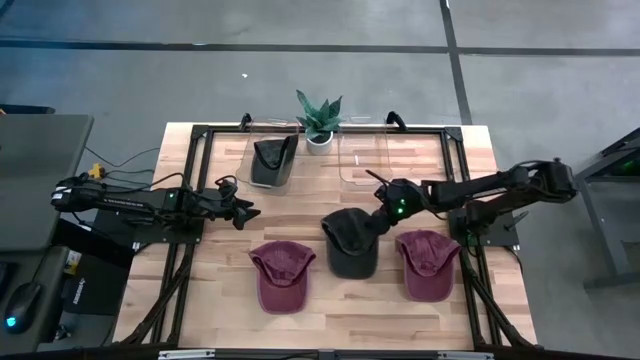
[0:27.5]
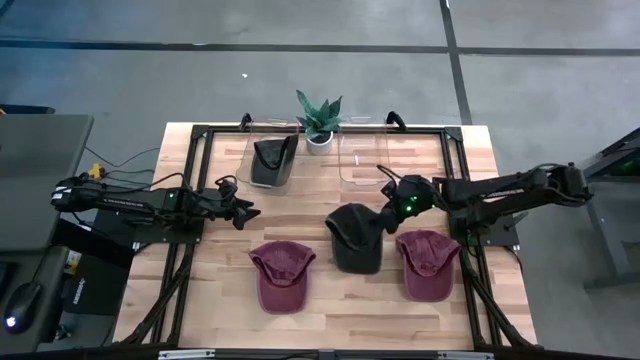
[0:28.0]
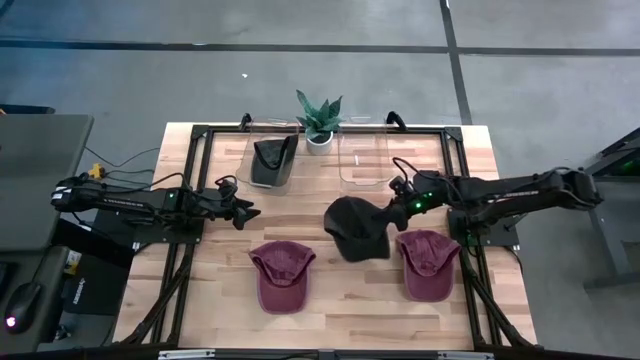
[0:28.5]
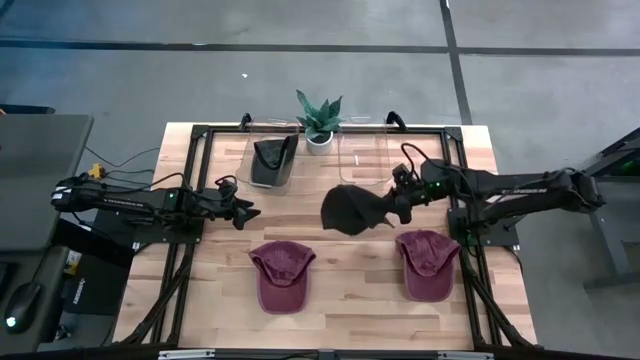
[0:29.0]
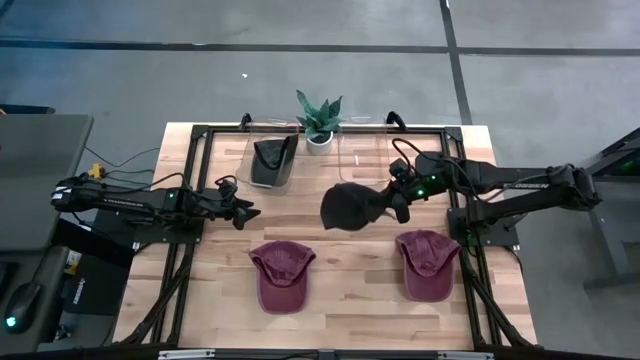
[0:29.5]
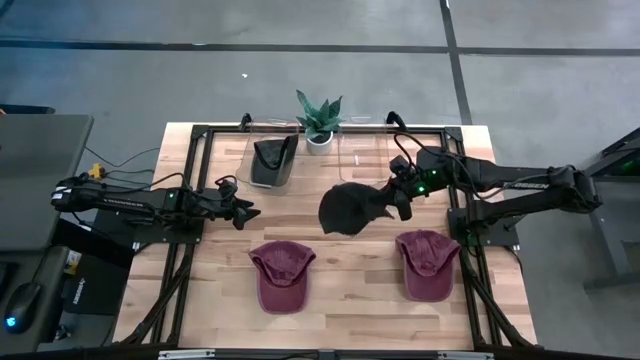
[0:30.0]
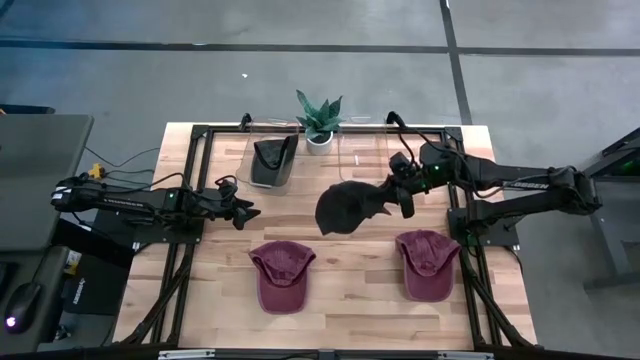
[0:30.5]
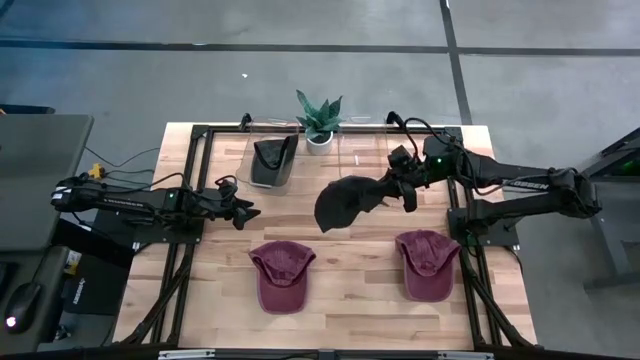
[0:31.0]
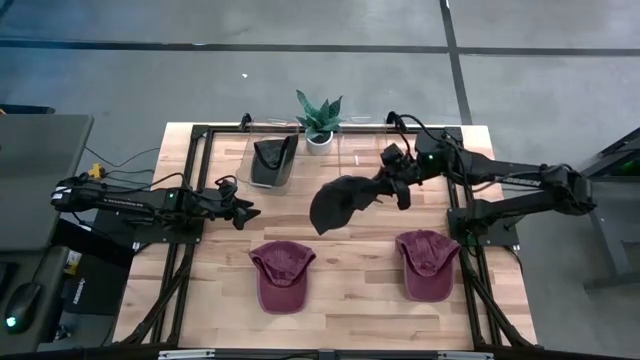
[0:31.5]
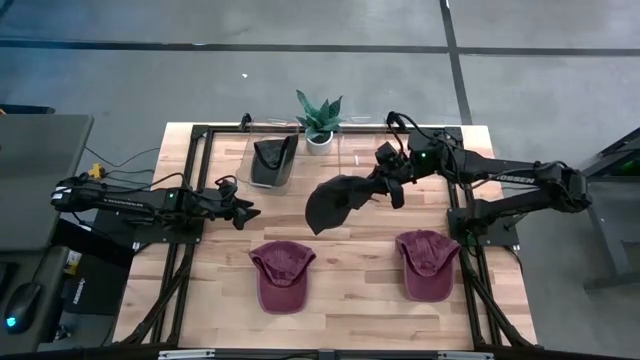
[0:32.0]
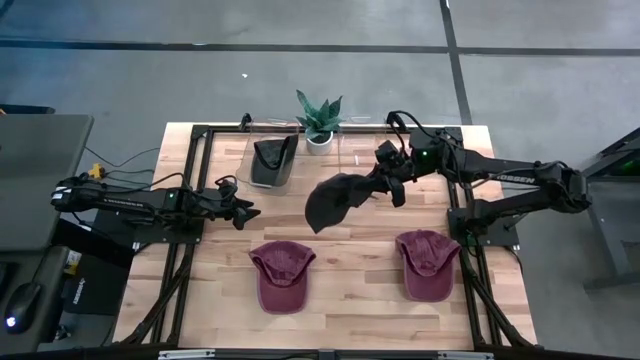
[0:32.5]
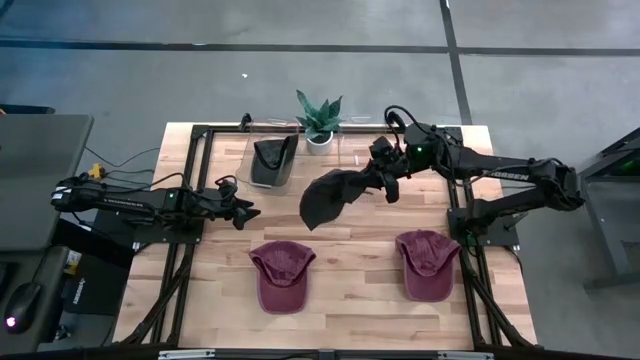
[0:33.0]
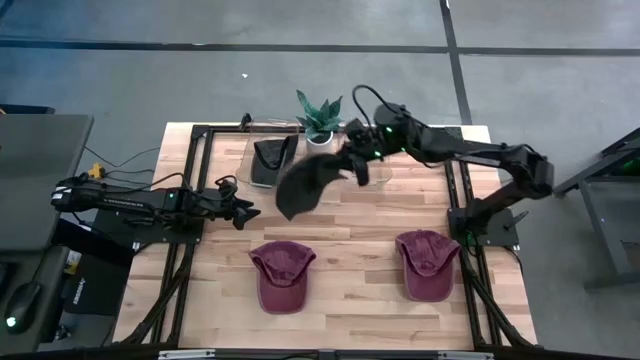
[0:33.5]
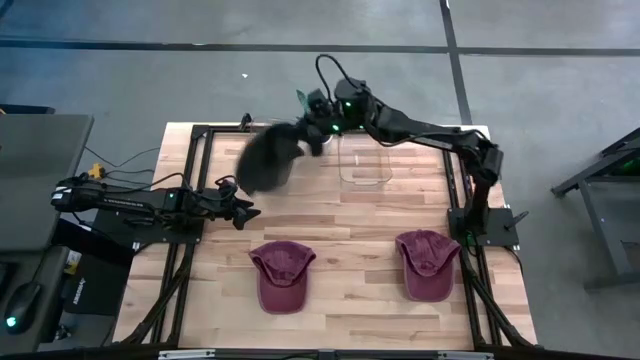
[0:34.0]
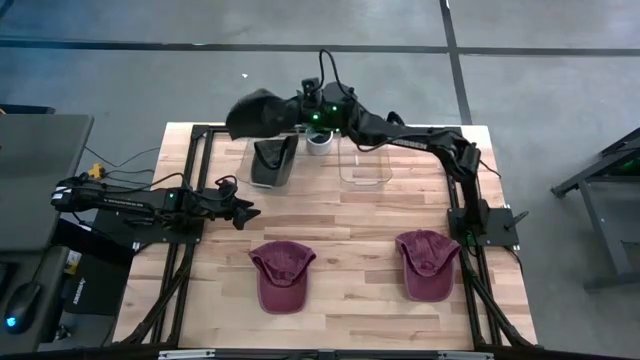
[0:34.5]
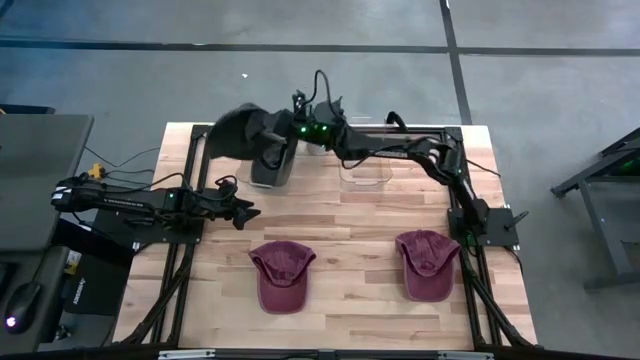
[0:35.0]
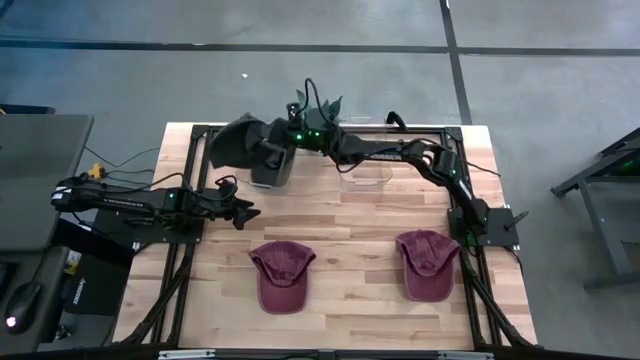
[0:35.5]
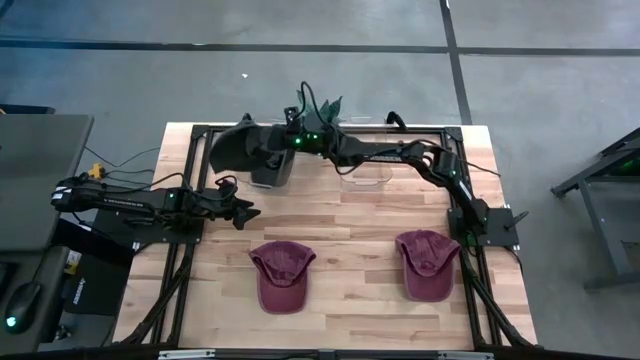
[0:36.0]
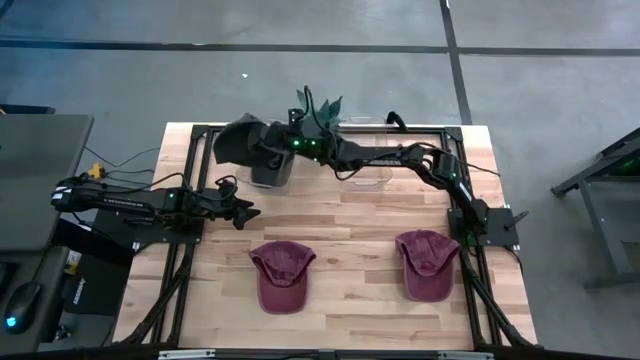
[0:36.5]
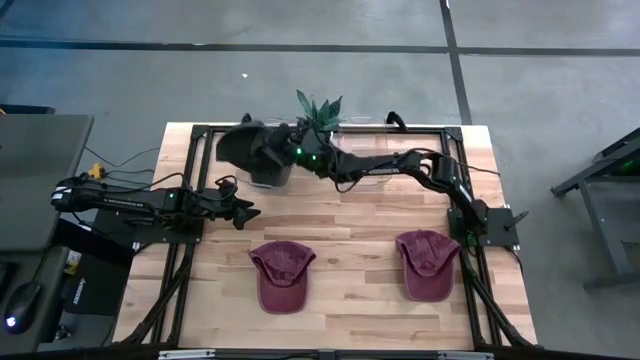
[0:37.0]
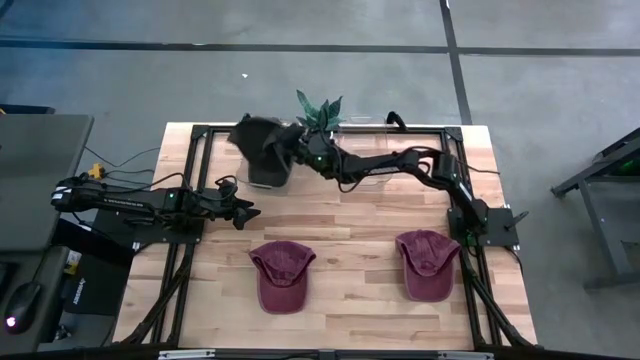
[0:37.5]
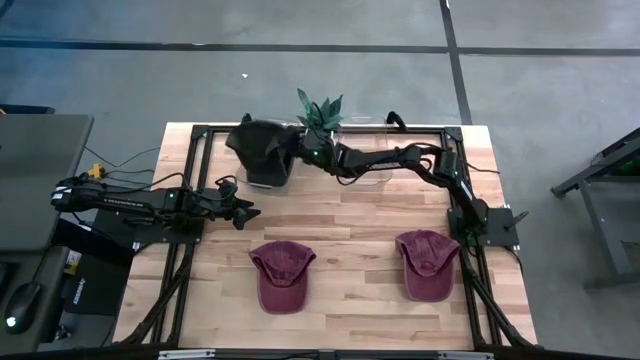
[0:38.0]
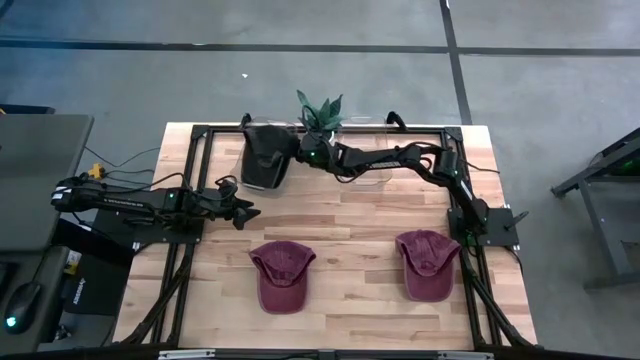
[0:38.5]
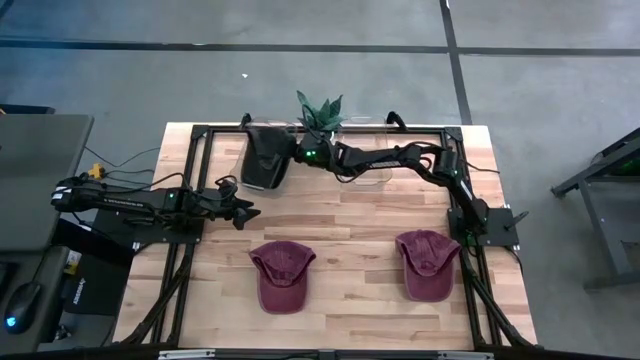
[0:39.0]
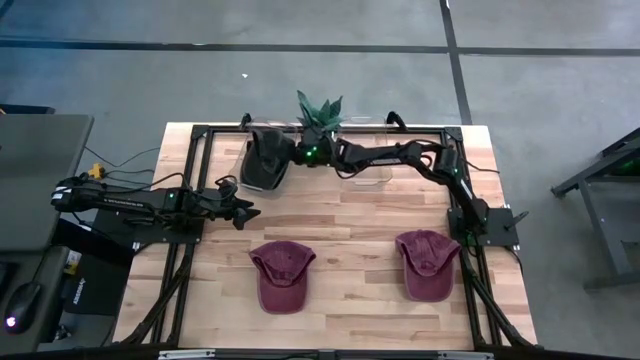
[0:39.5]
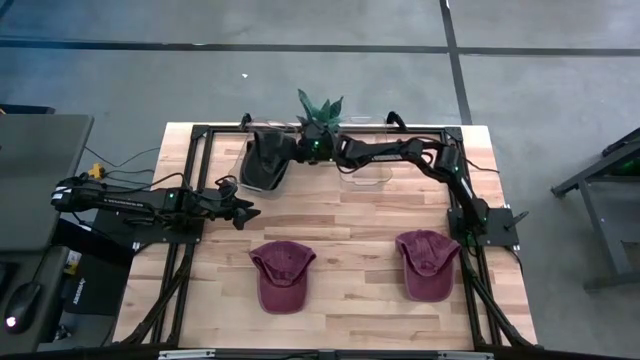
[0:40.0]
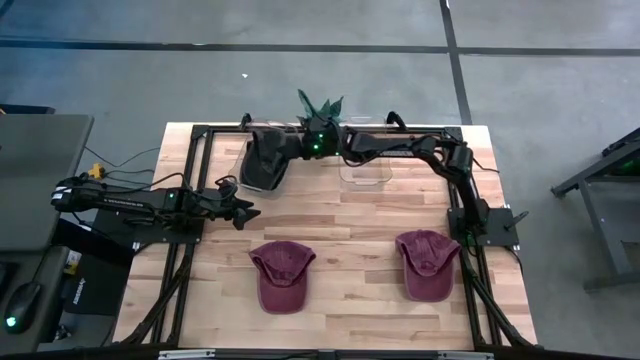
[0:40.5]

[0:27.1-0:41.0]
Task: Pick & Place hat
Put the black cap into the left transparent bin

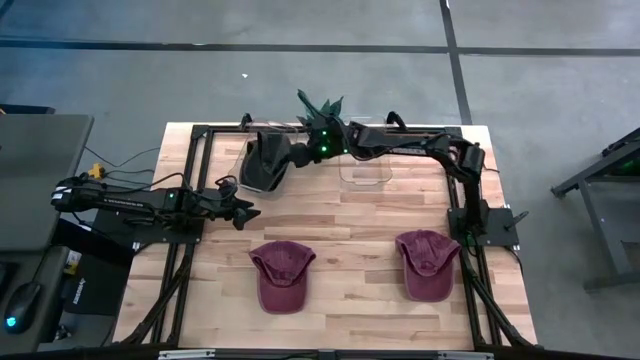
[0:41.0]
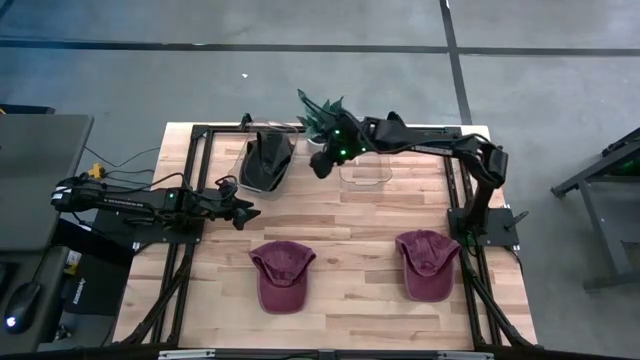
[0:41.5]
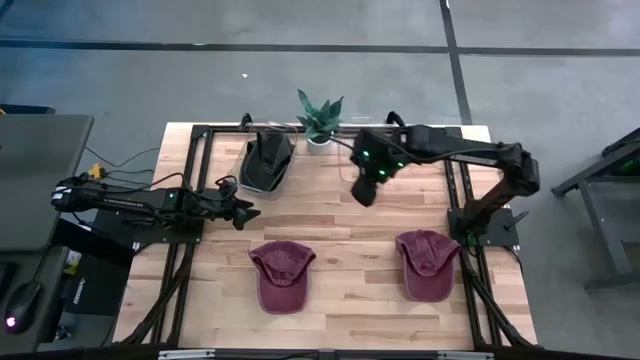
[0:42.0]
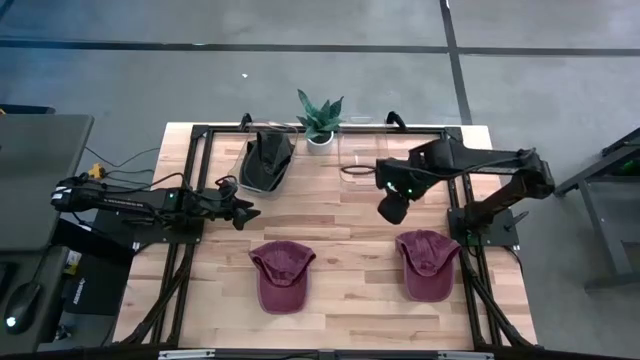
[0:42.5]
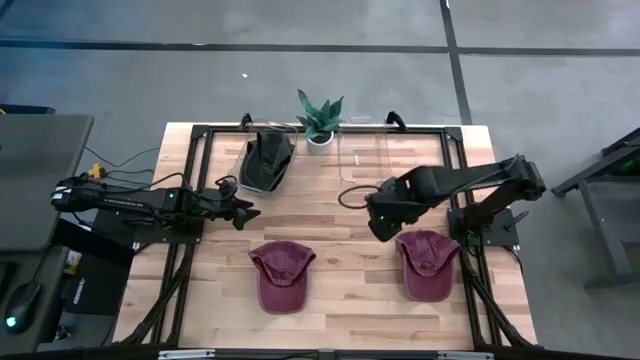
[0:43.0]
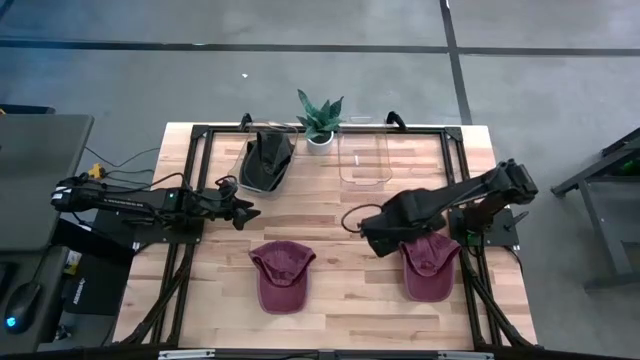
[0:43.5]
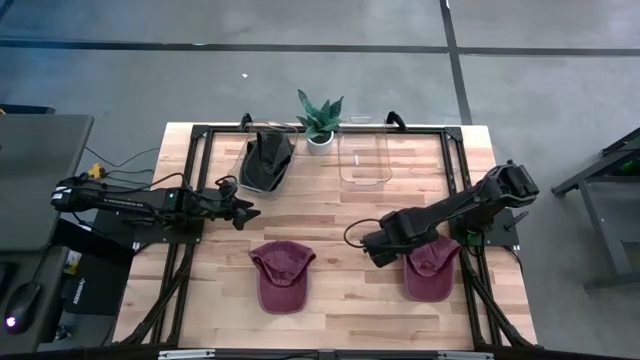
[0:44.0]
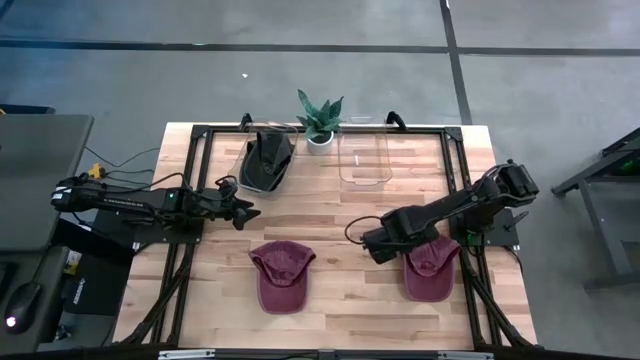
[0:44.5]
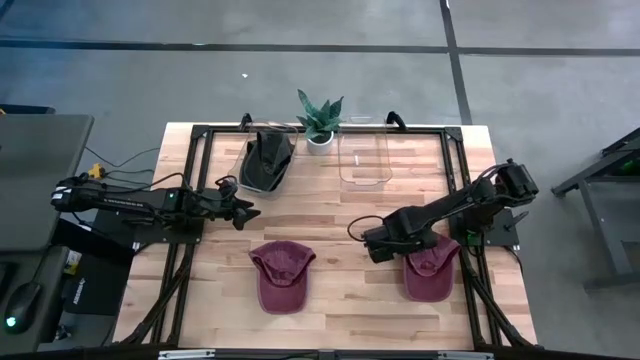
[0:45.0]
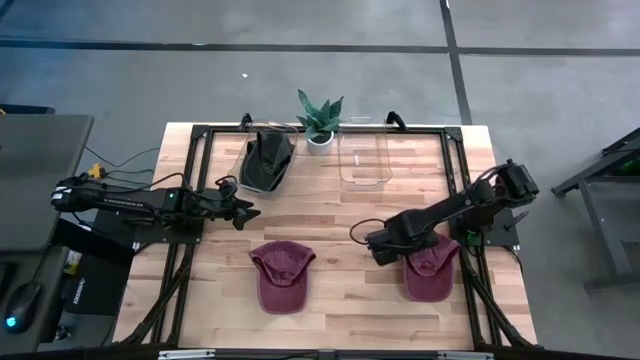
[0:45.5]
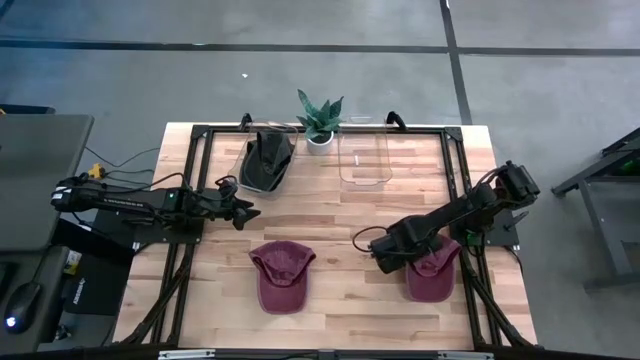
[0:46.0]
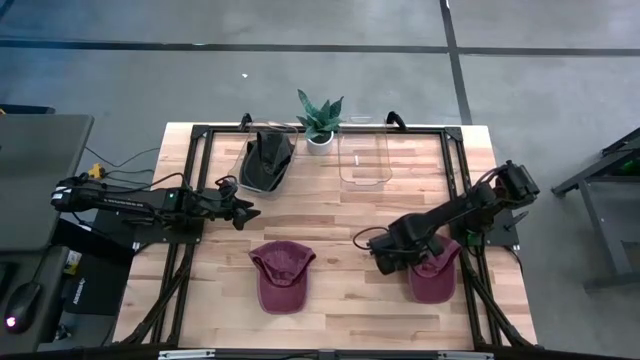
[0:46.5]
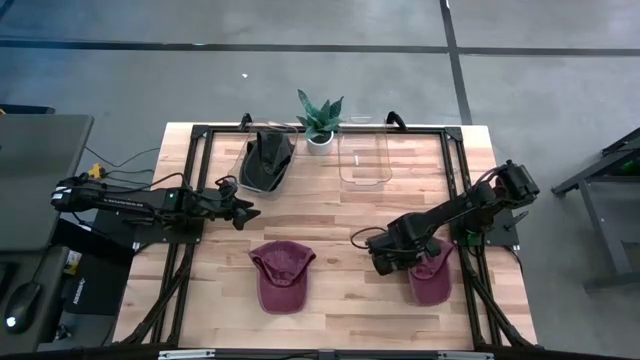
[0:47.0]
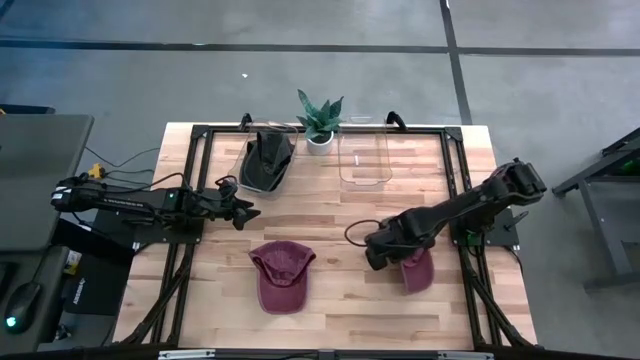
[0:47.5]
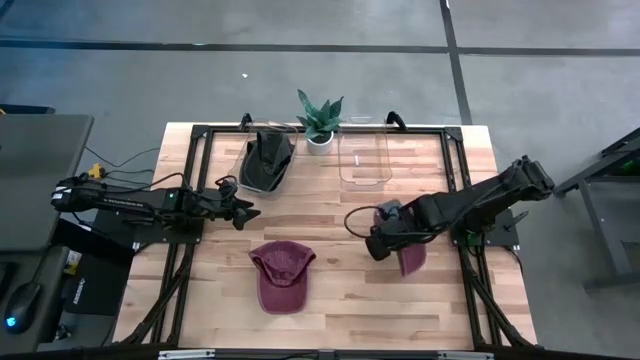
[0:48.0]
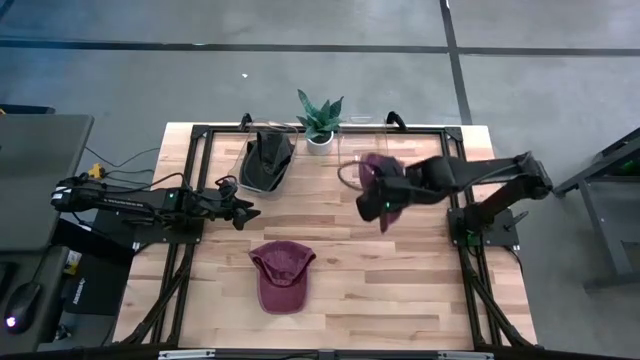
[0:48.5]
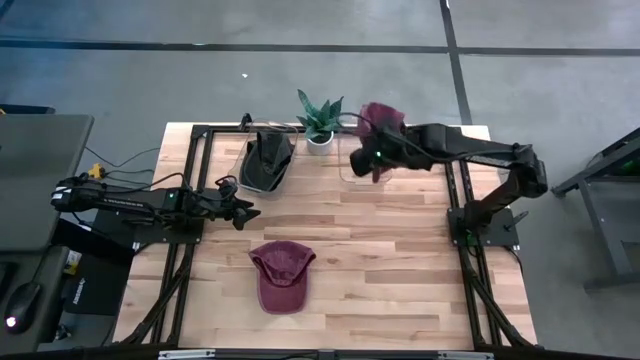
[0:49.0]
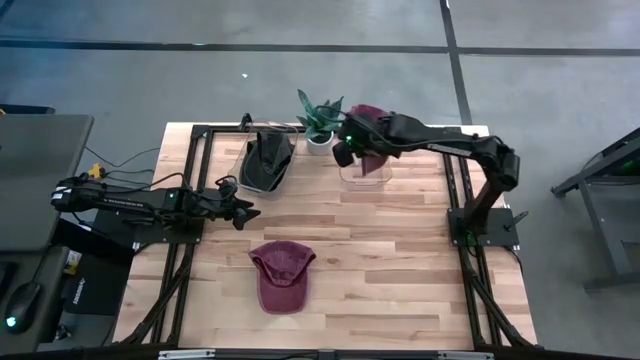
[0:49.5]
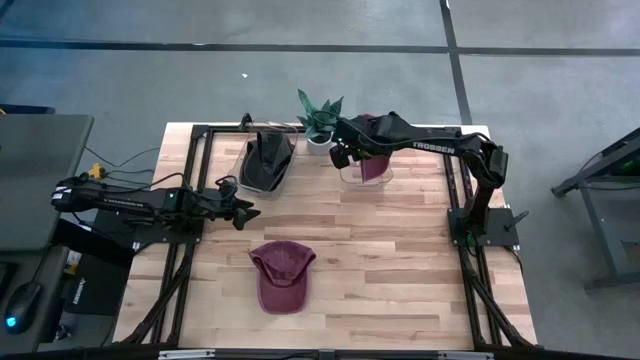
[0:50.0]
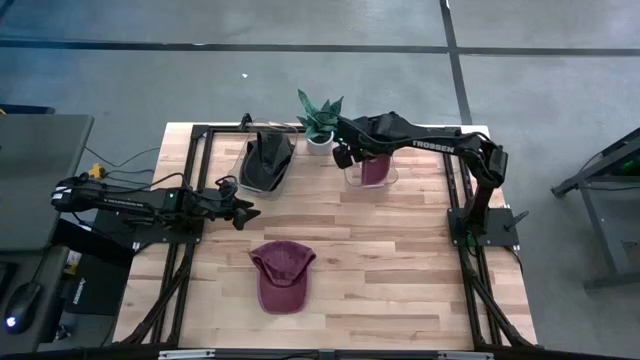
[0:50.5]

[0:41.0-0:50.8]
Put the right red cap into the right transparent bin
